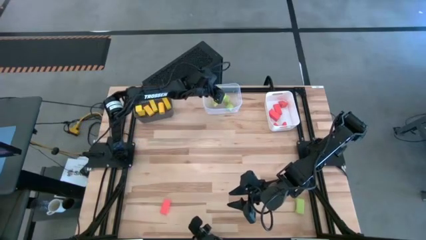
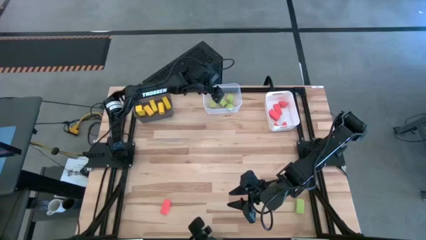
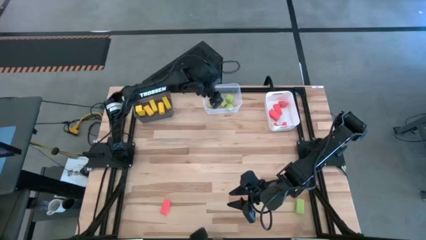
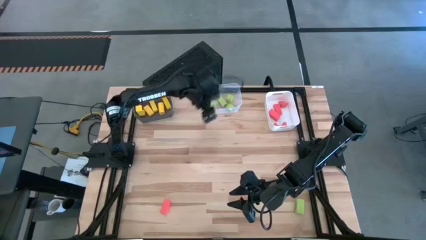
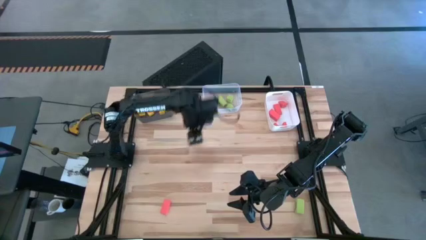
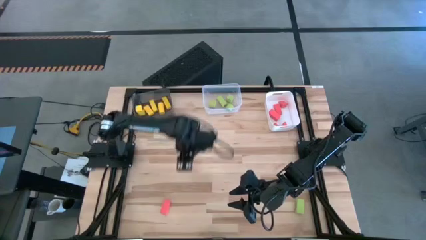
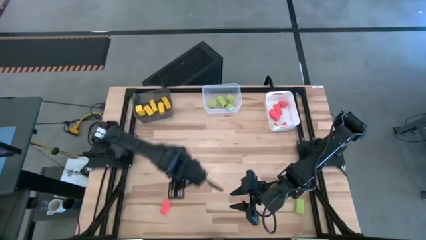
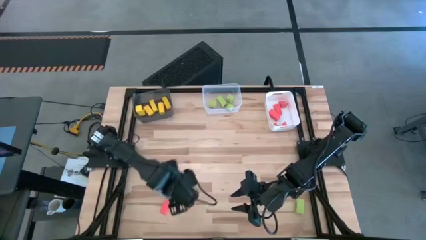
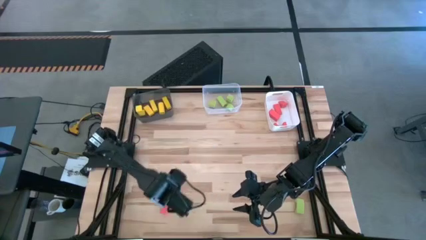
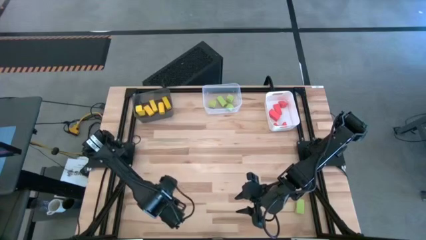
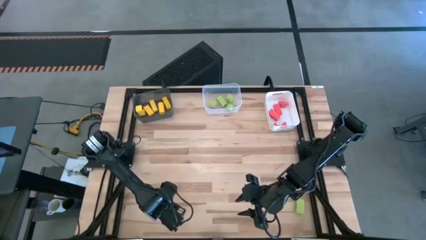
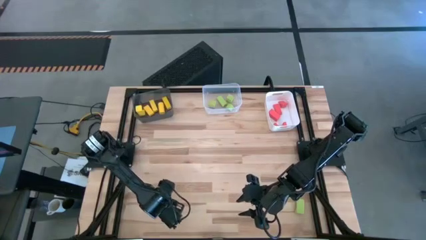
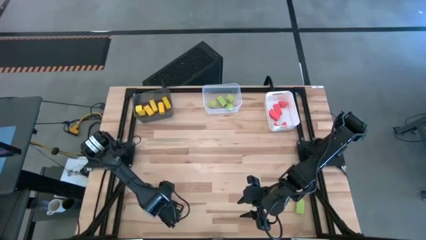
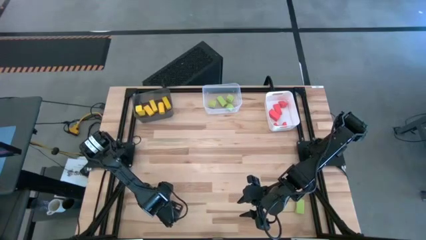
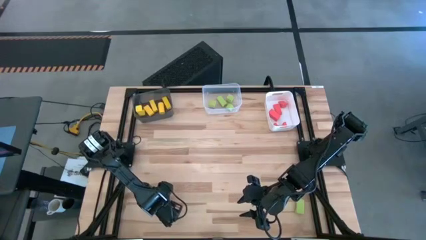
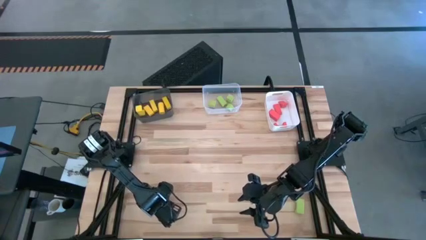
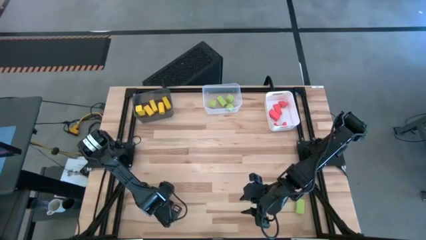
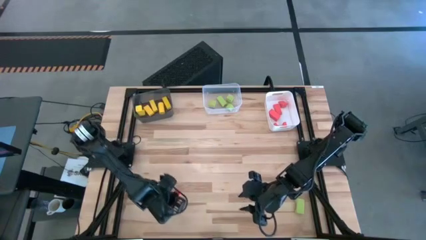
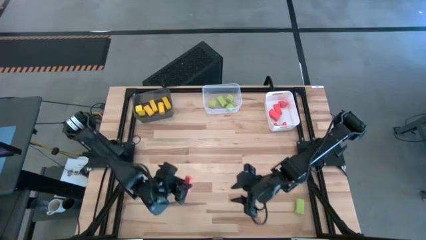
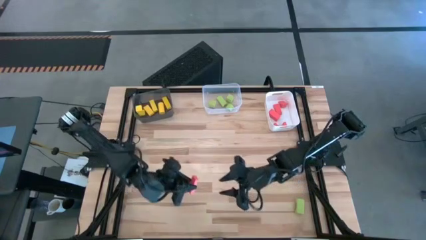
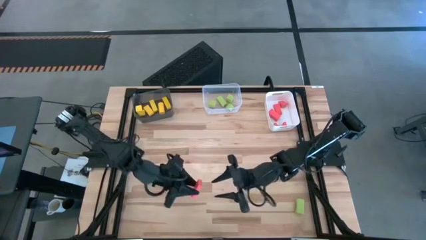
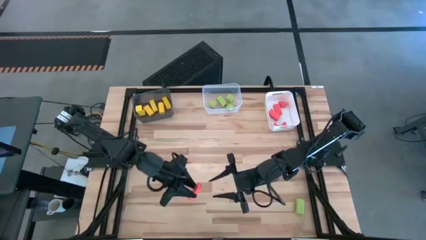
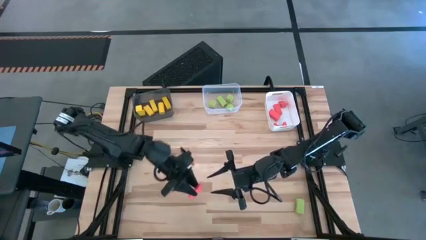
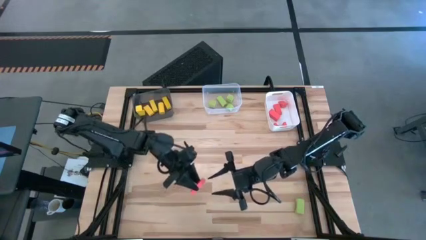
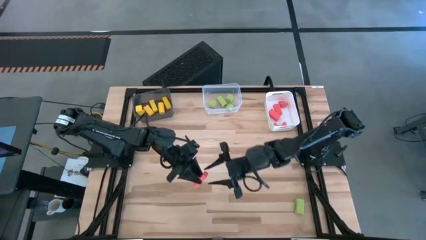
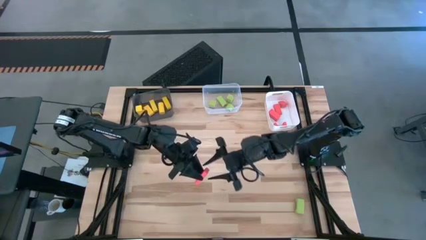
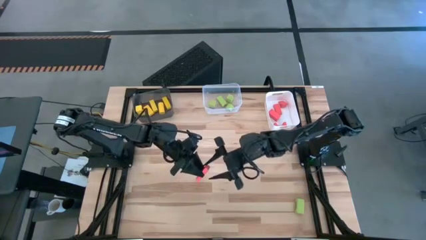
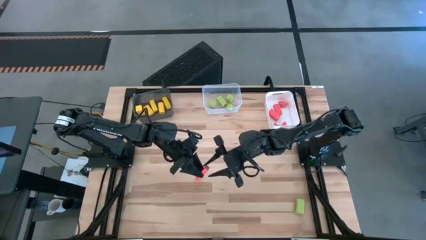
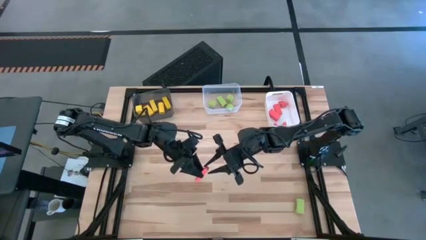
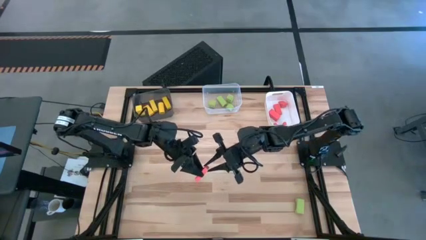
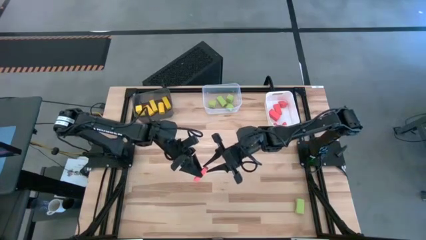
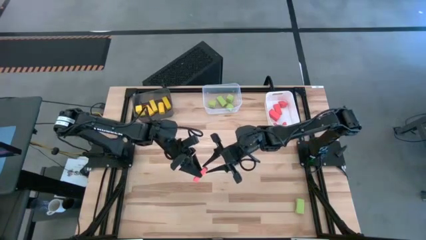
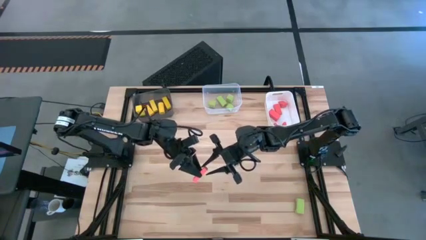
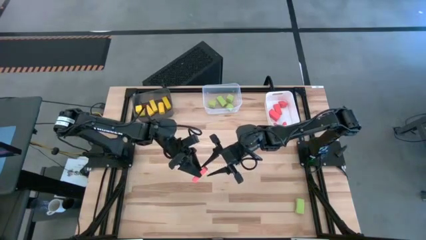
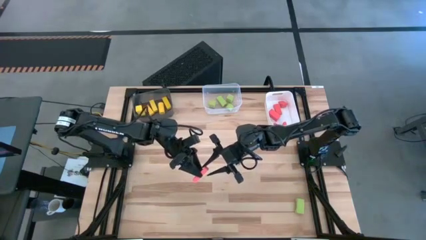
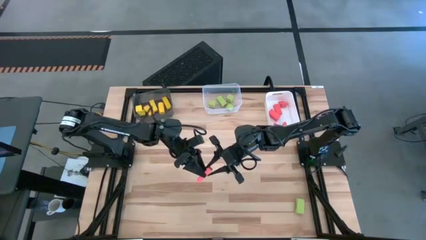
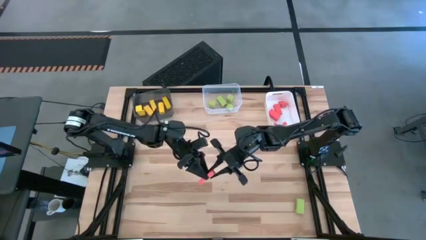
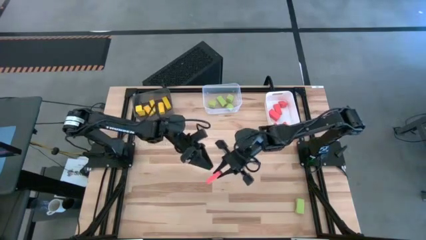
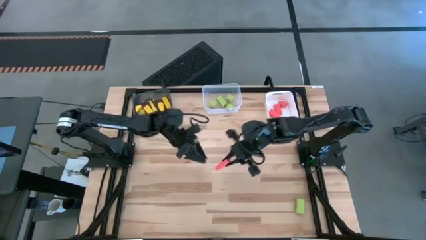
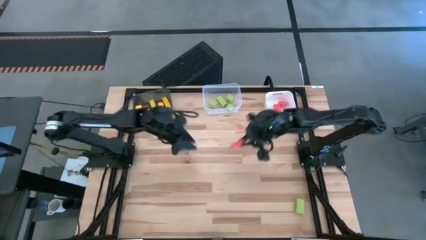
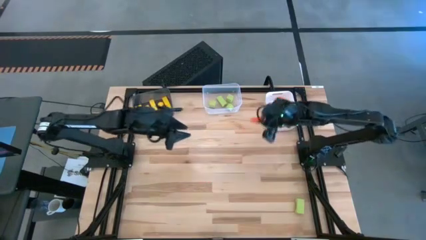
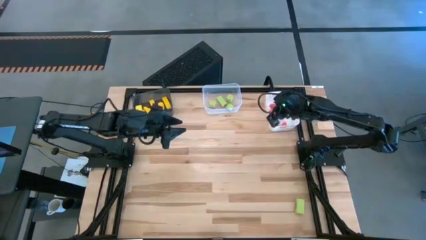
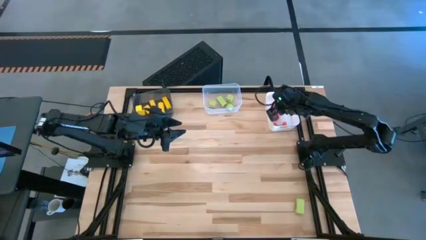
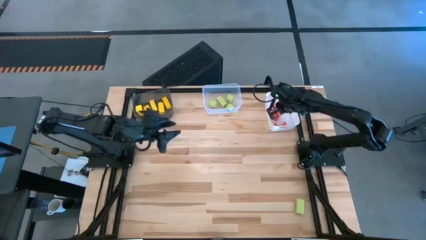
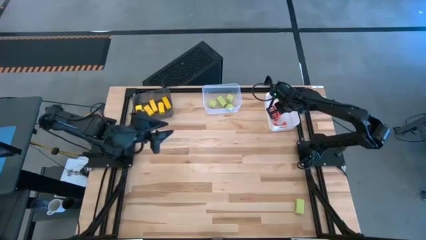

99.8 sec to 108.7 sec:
Task: Sort & place blocks by color
Put the orange block into the white bin

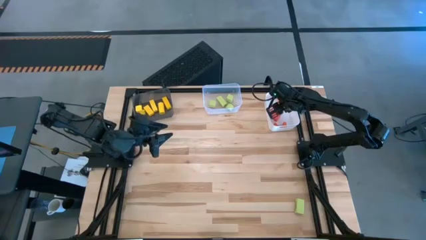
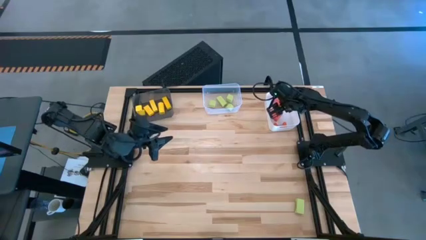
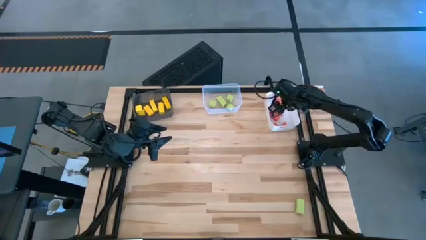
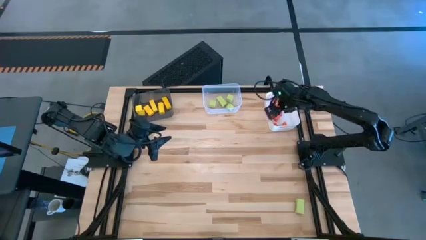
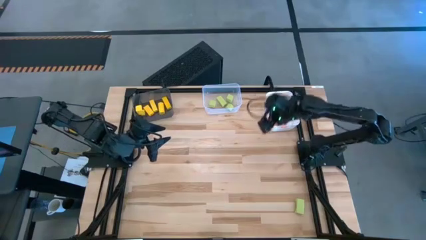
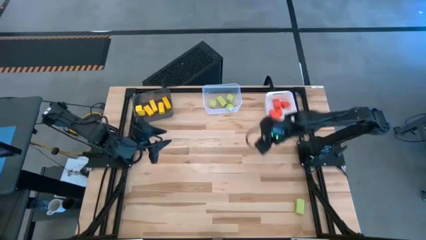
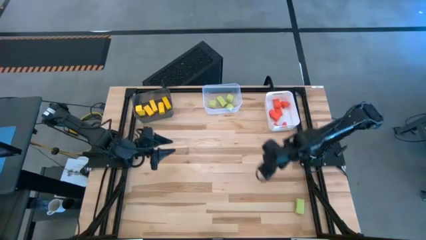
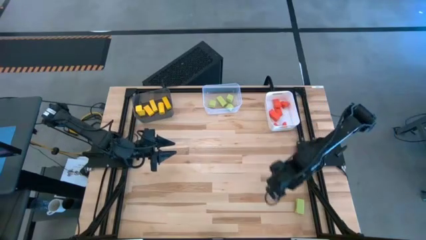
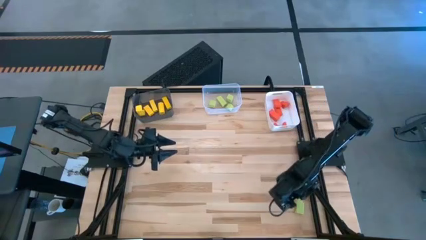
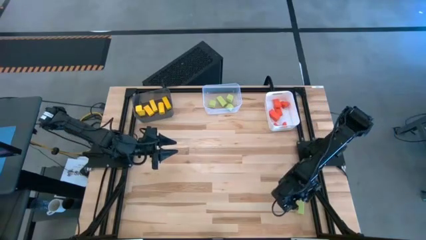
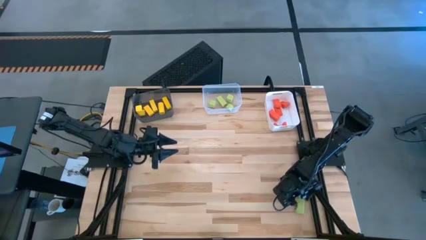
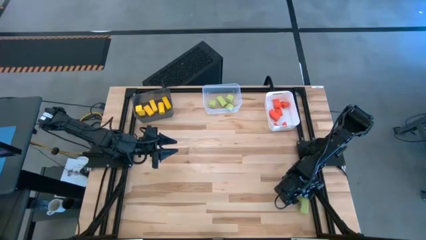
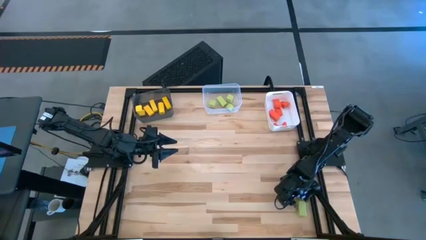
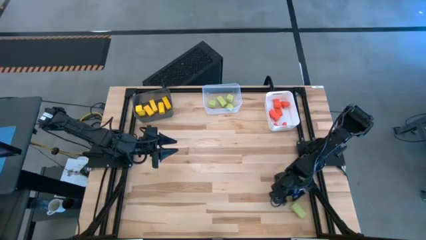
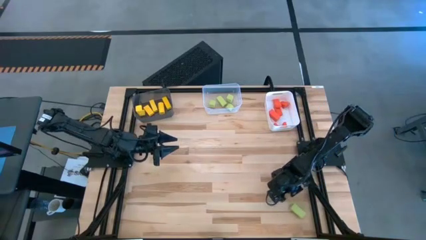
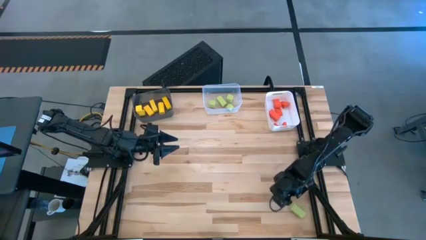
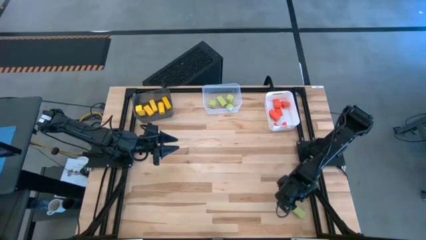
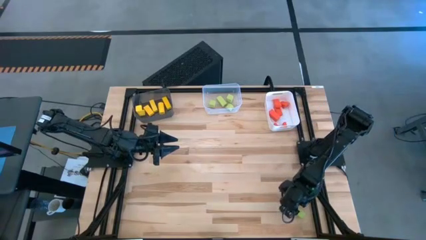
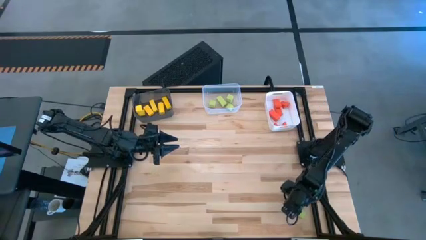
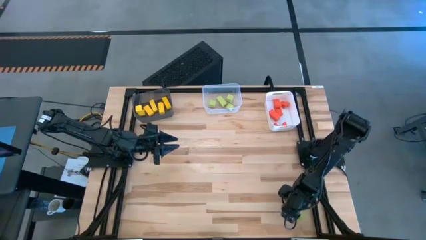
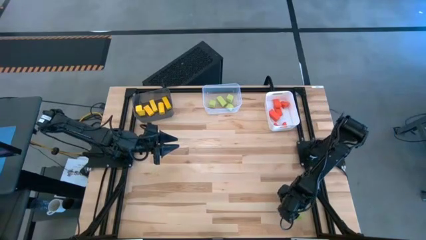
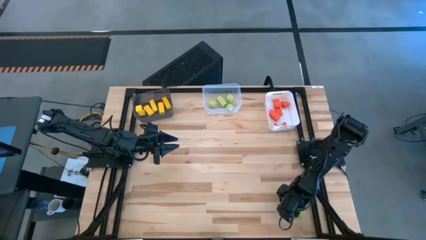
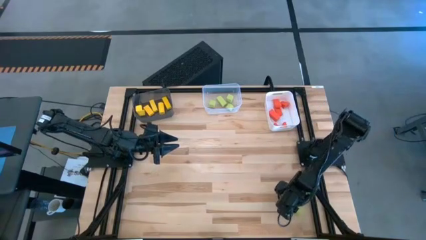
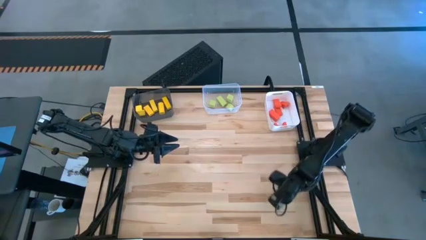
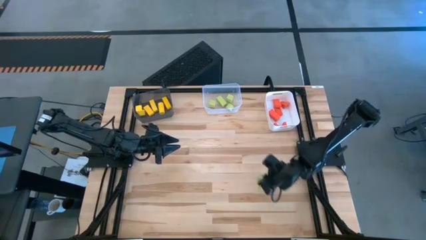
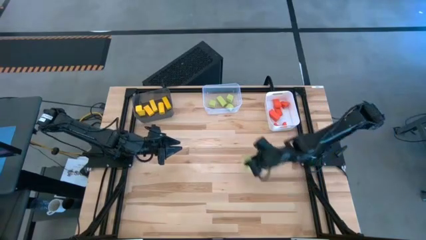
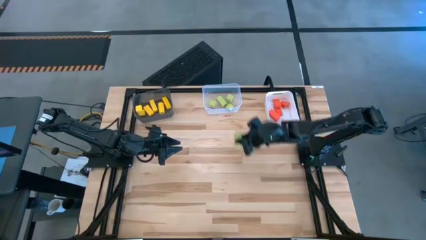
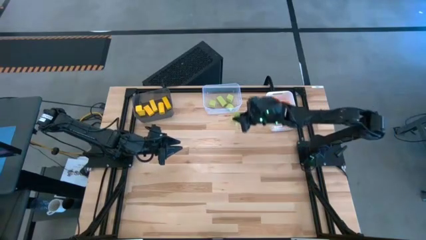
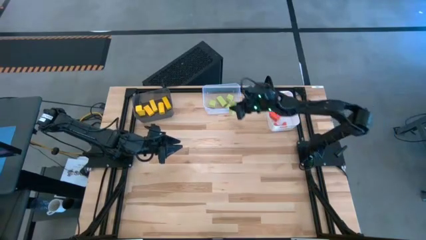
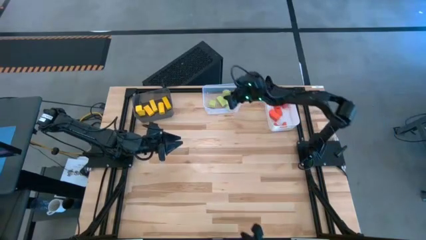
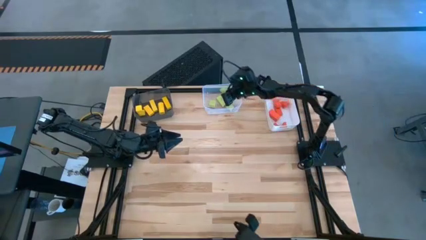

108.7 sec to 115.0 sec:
Put the green block into the transparent bin
